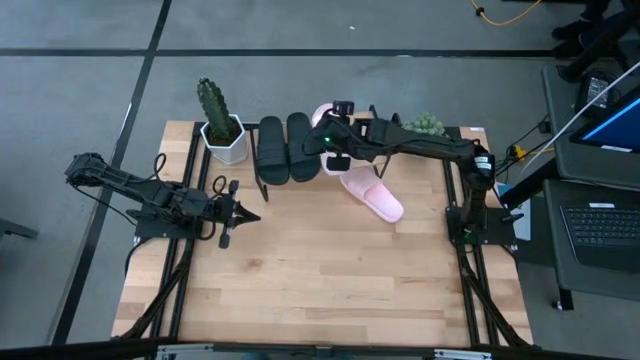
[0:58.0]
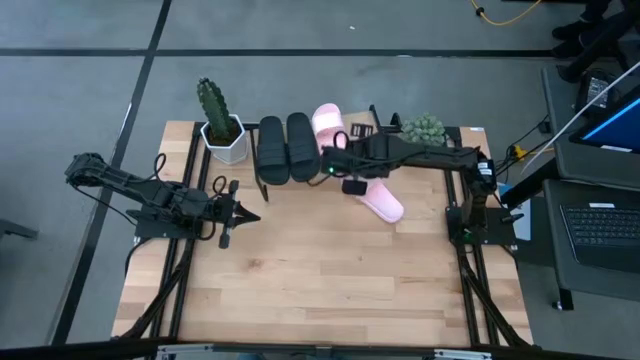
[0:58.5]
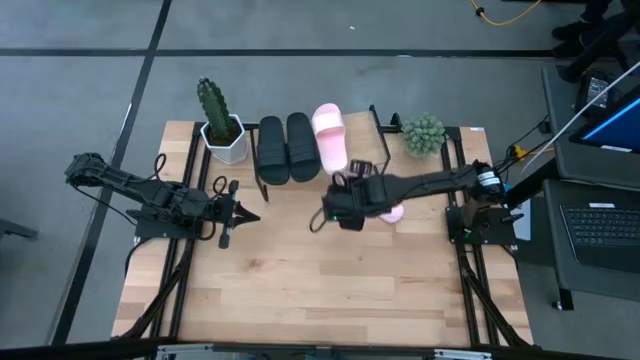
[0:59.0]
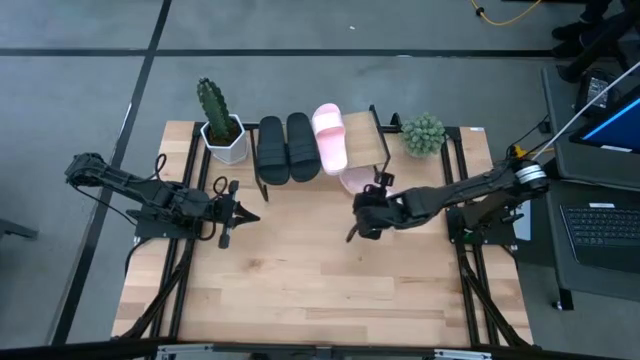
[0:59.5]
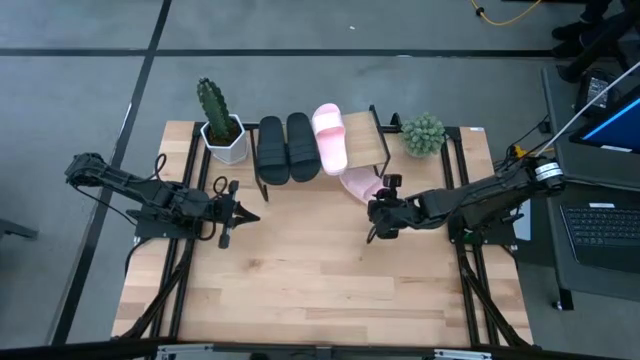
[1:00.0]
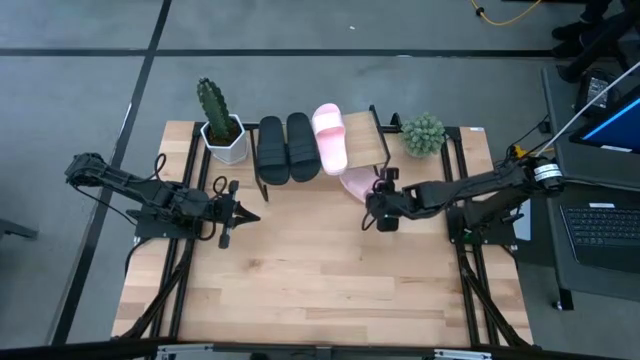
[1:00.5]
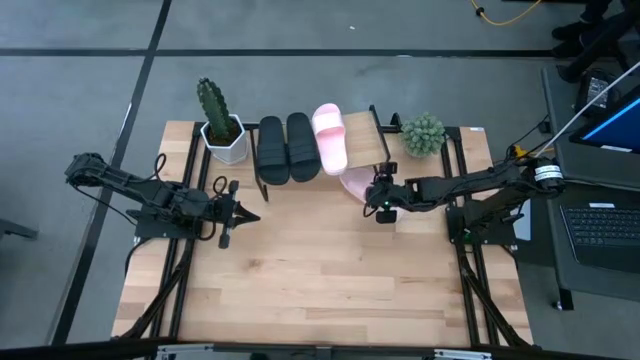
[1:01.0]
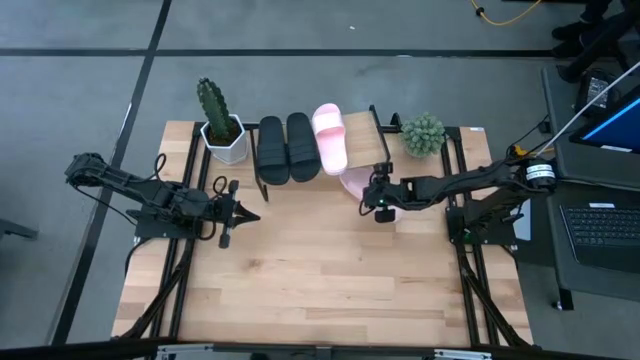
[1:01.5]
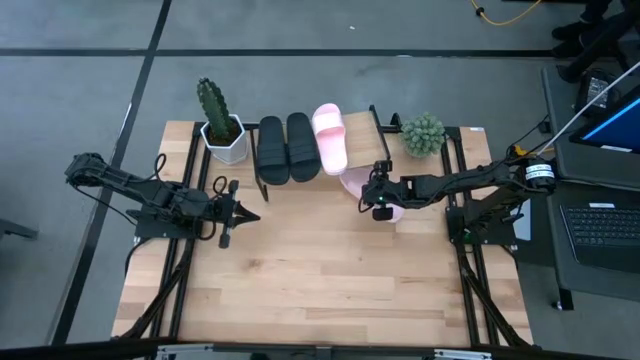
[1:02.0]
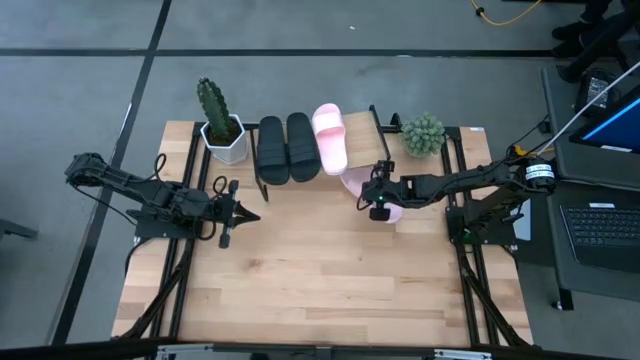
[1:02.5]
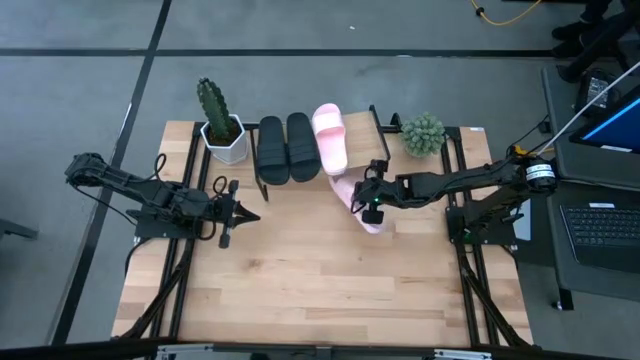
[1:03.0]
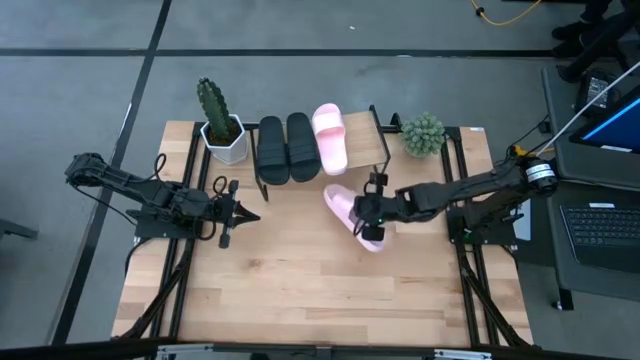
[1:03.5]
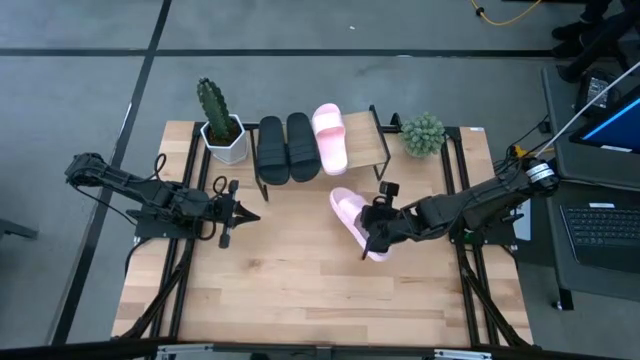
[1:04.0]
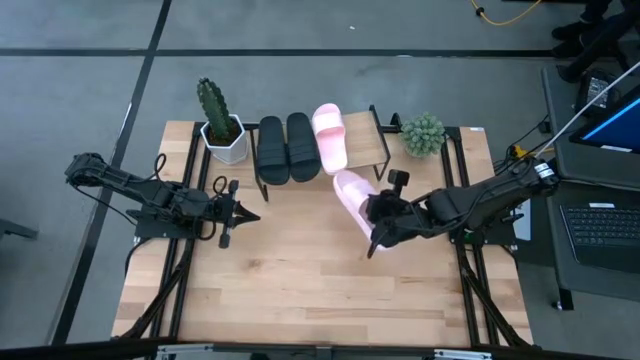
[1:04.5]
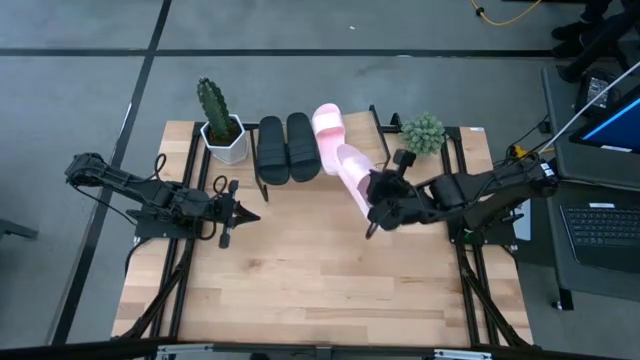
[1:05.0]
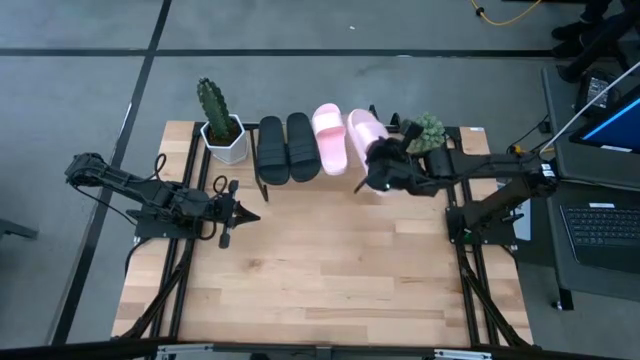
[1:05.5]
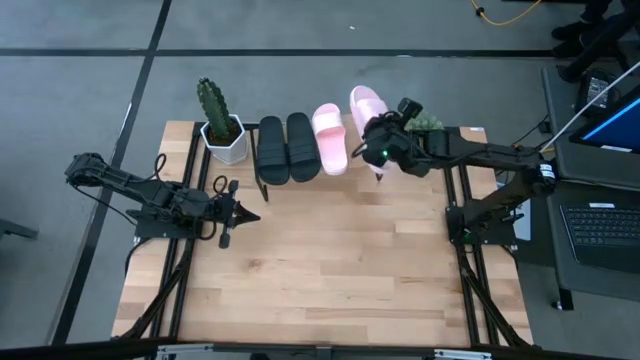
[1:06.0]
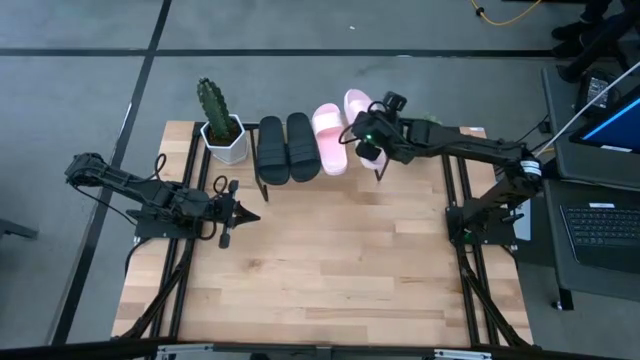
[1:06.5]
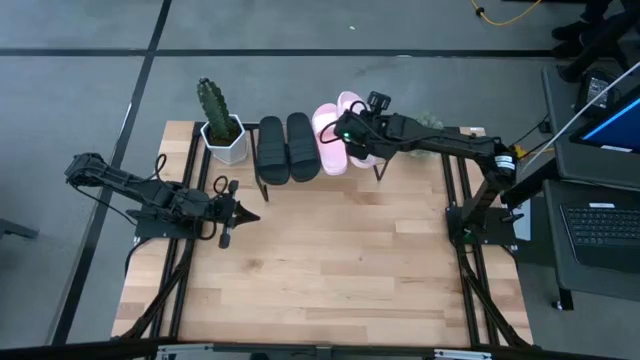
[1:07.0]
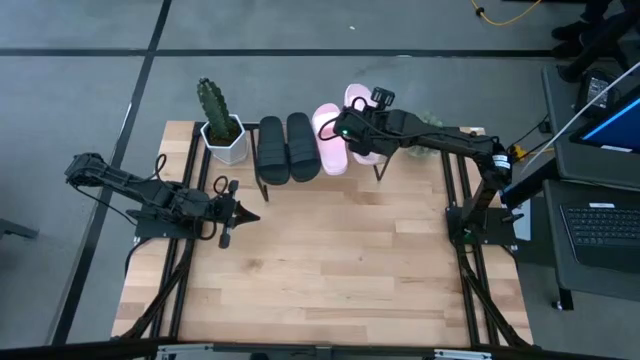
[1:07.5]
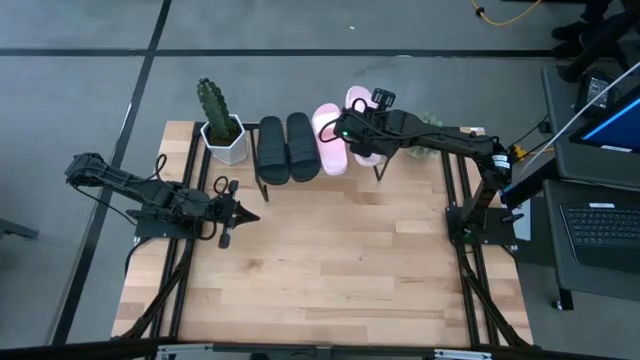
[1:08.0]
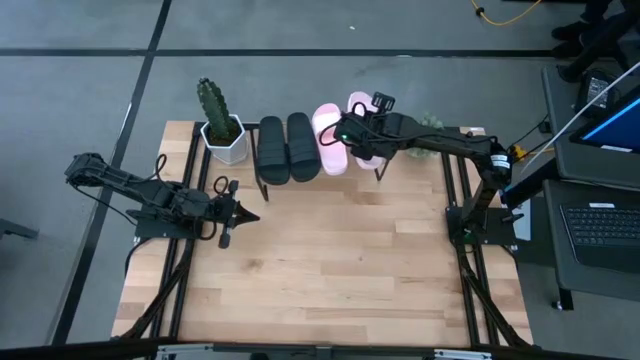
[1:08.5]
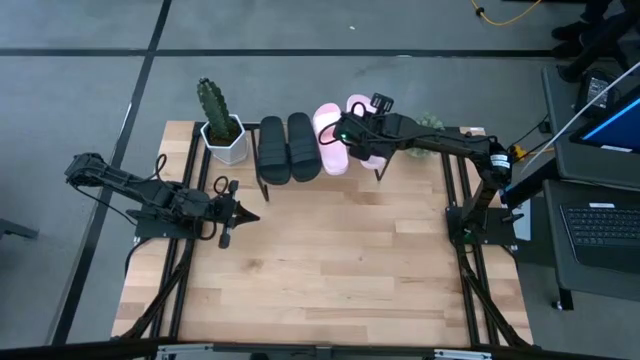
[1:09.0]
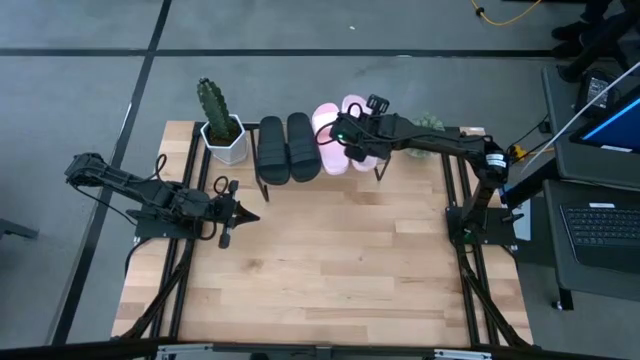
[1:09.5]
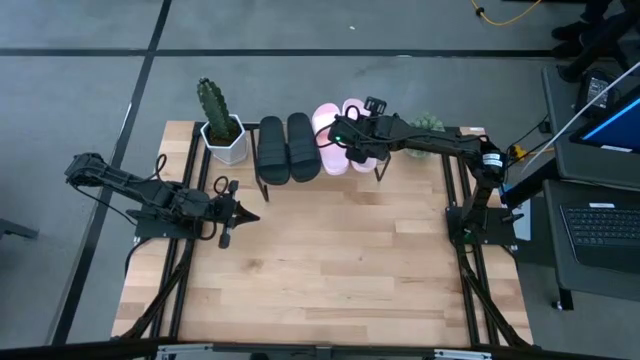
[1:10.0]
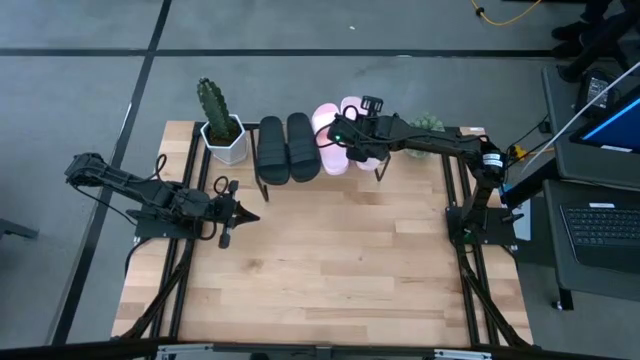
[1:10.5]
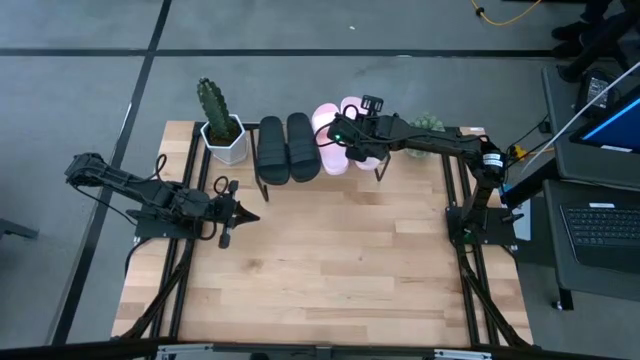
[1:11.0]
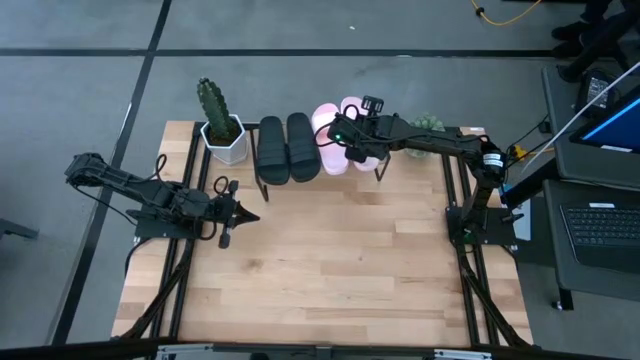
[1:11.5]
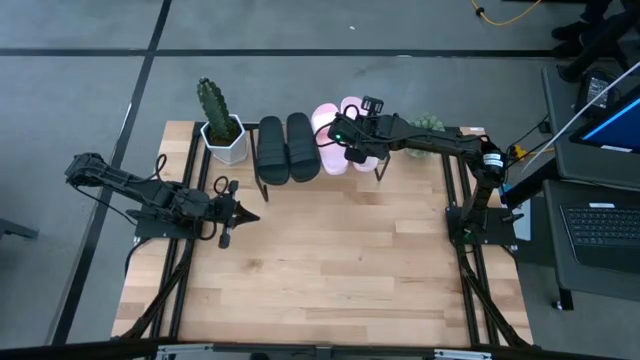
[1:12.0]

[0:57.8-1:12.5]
Task: Pick and place slides into the shelf
Put the pink slide on the shelf

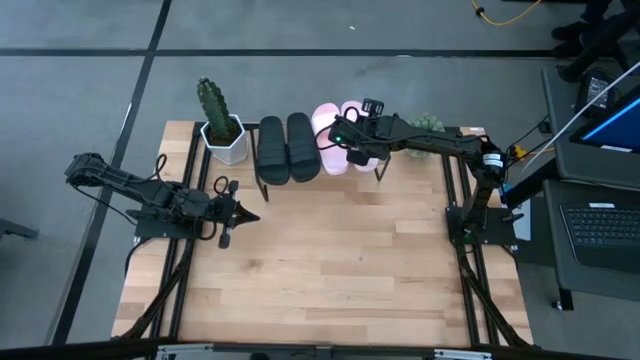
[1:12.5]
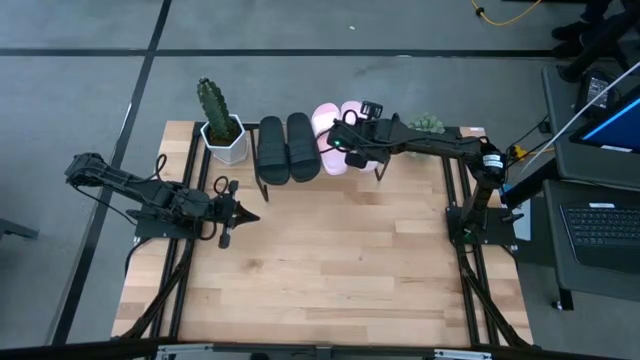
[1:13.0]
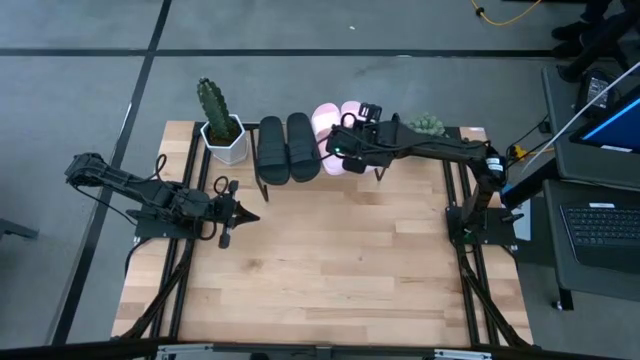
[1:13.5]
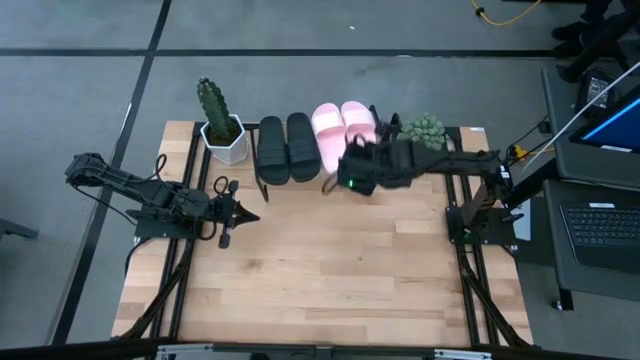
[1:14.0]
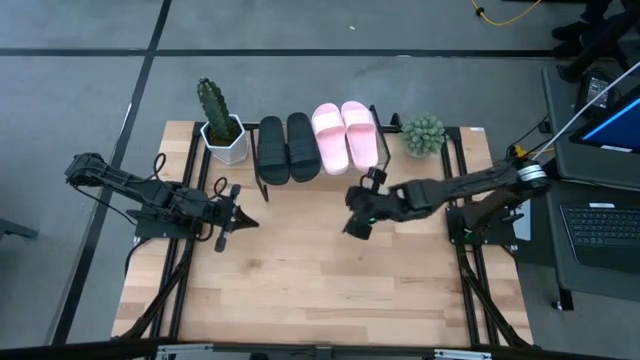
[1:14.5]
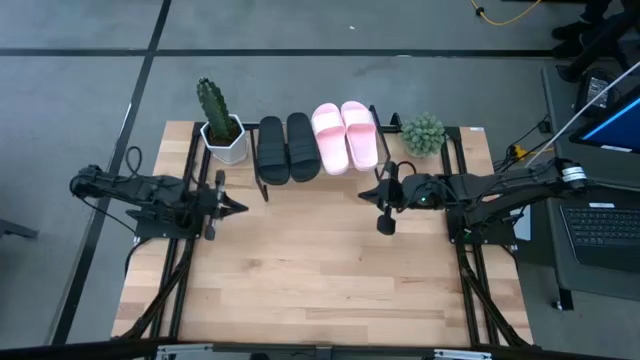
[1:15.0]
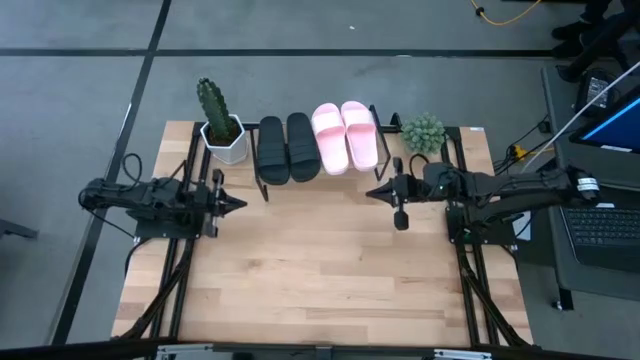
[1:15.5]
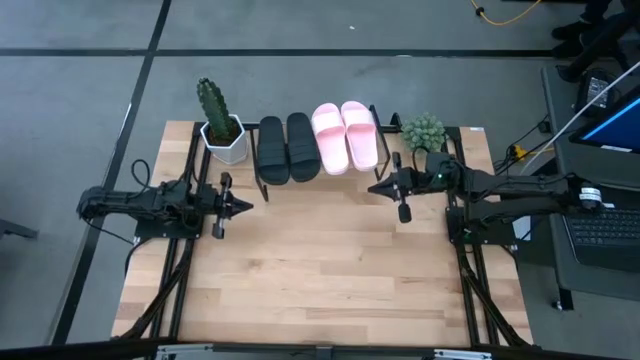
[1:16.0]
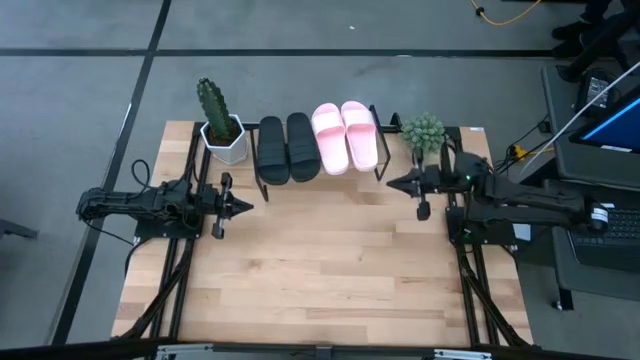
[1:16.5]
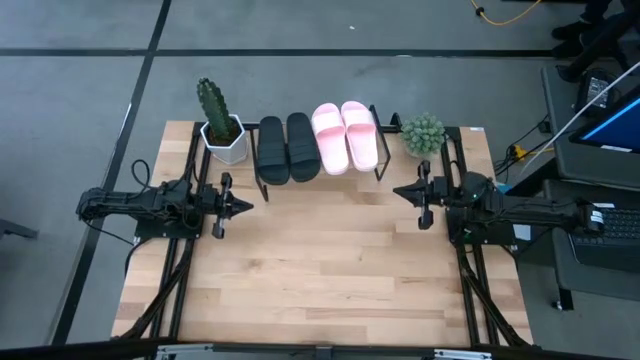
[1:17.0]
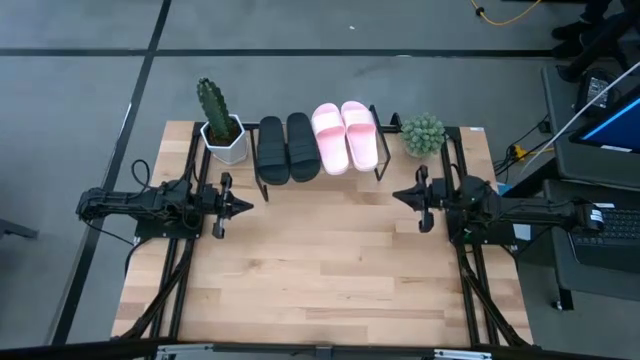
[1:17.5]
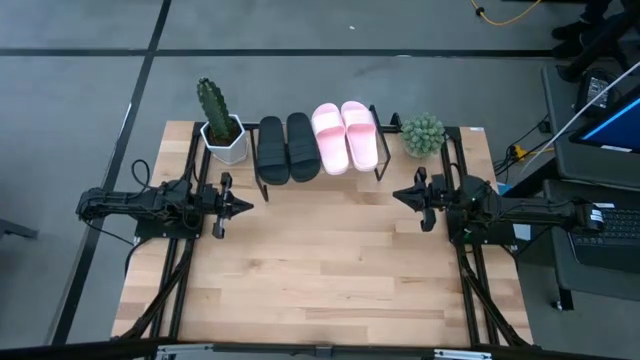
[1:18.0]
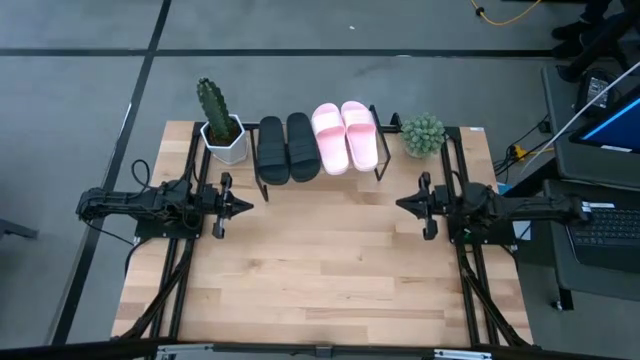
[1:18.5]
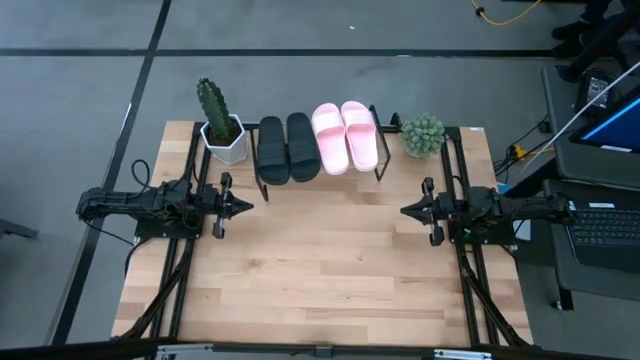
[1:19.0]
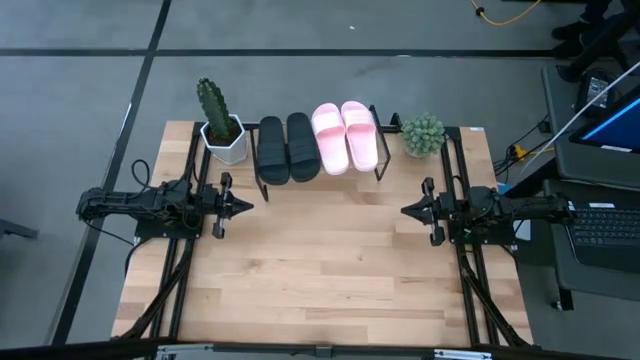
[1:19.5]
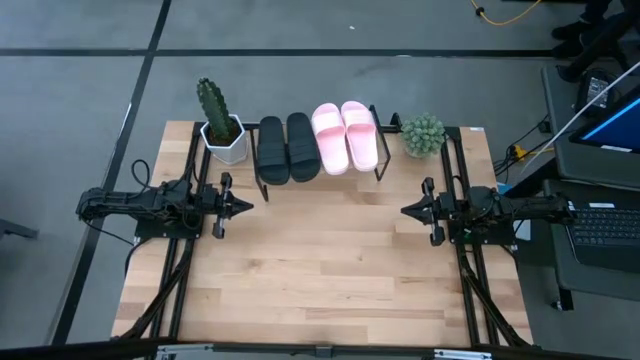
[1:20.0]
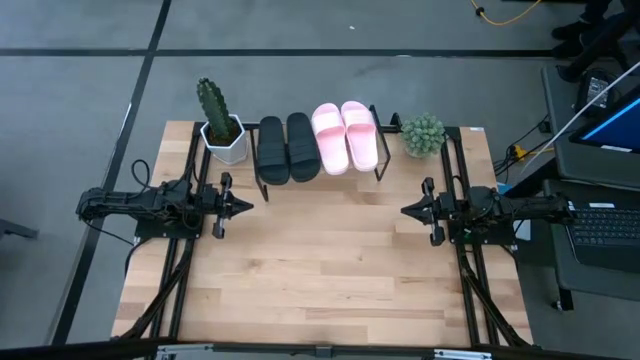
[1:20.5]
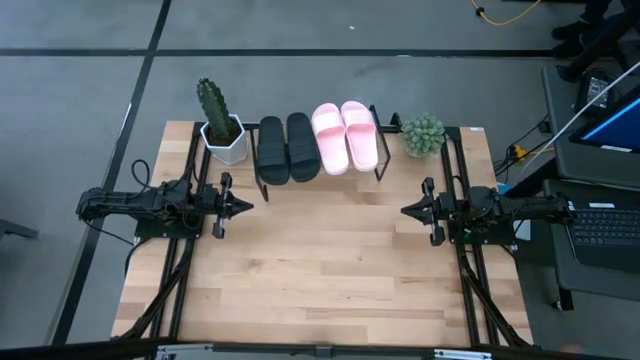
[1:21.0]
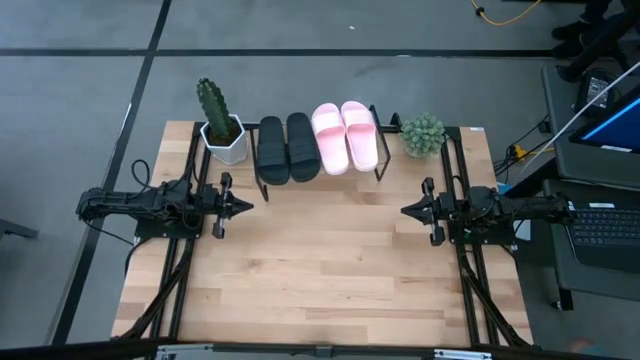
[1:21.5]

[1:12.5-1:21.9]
Return to Home Position
